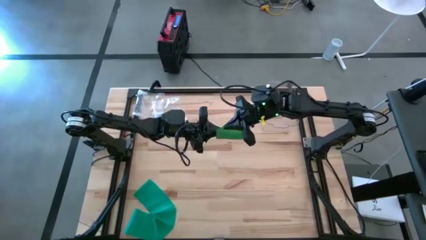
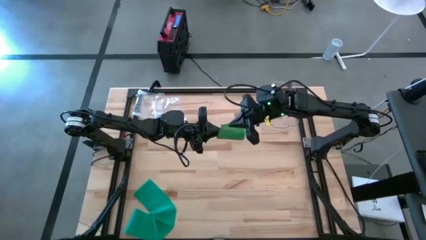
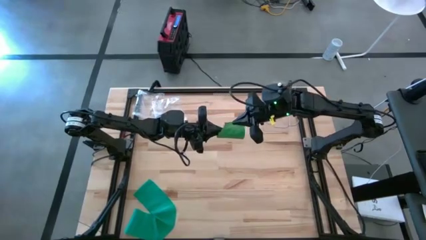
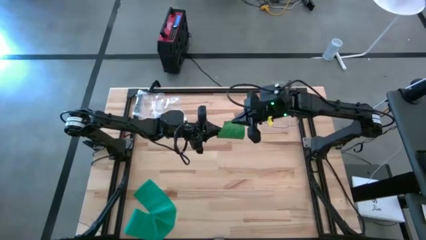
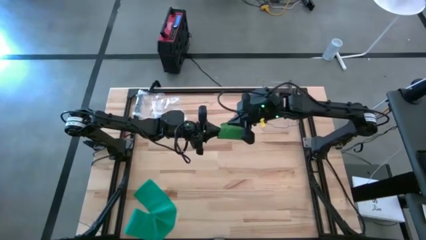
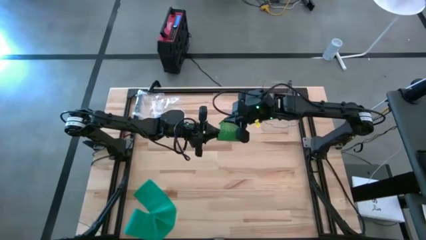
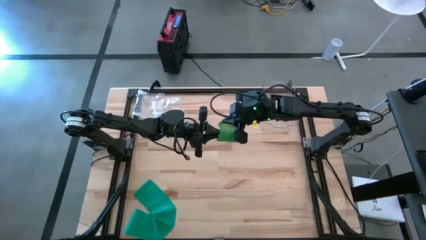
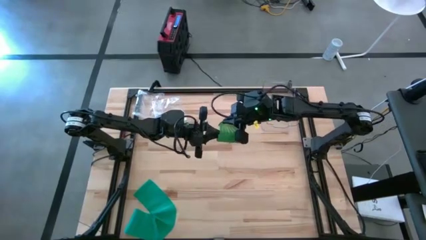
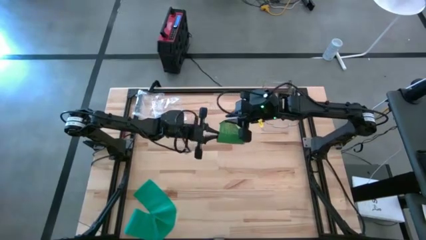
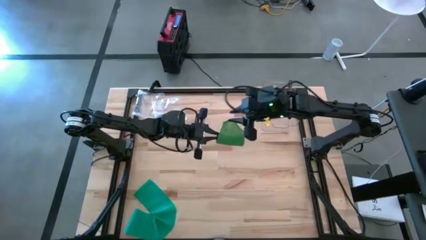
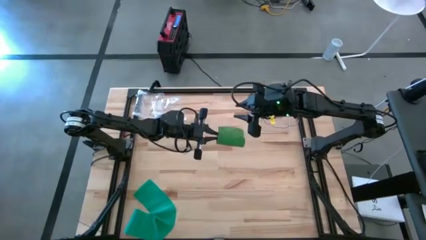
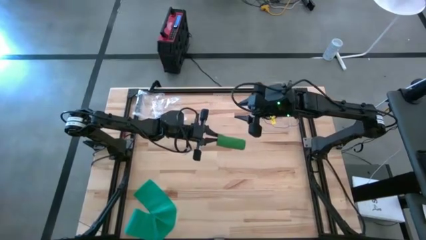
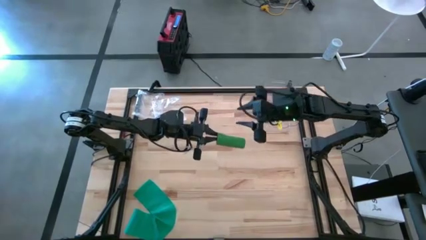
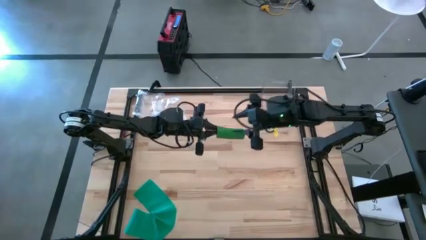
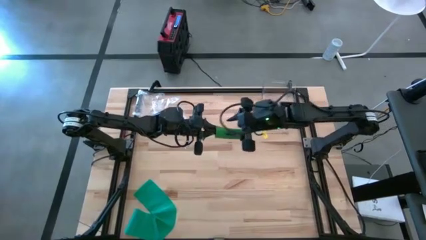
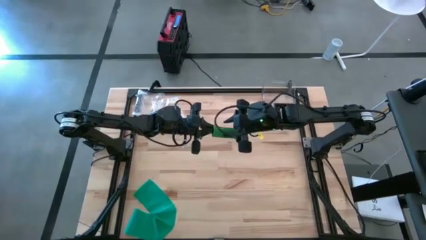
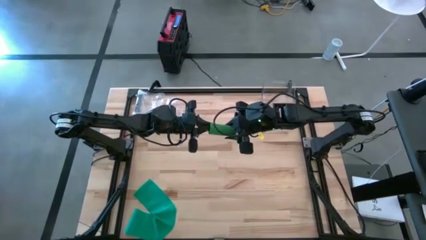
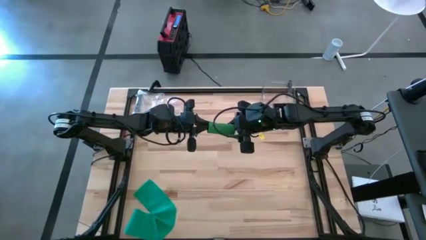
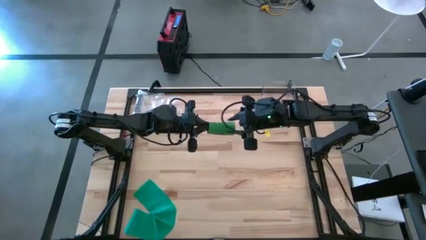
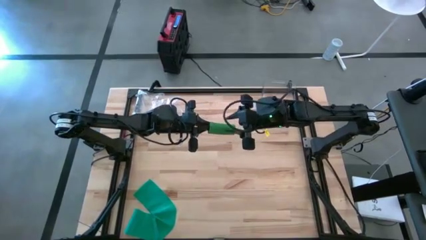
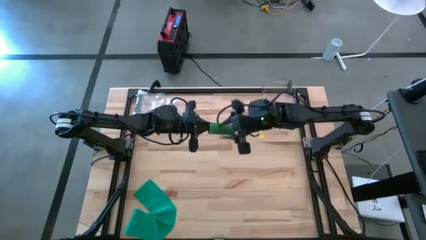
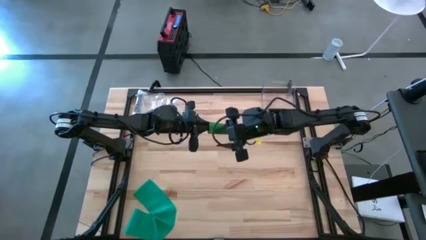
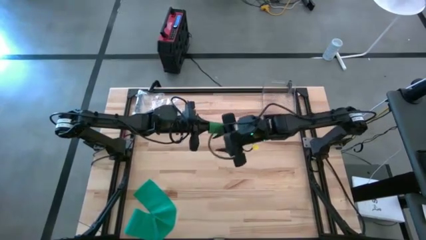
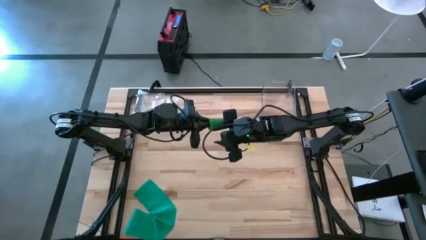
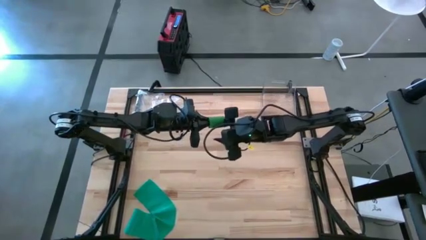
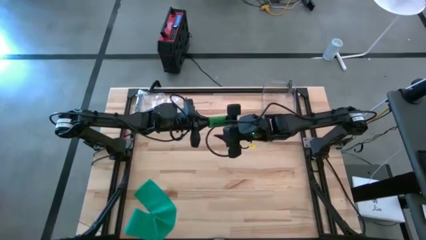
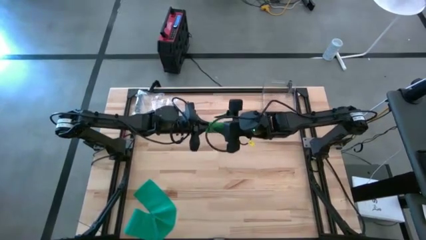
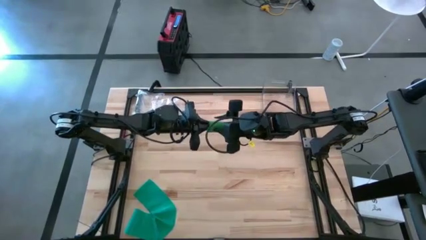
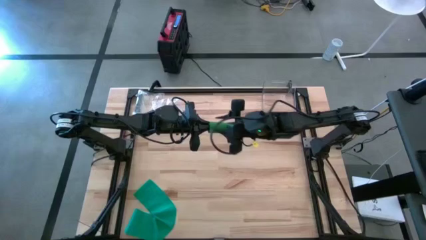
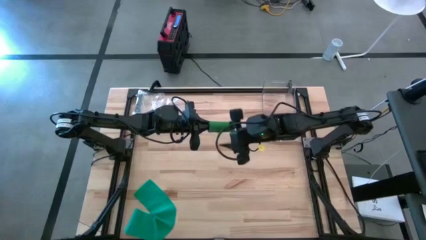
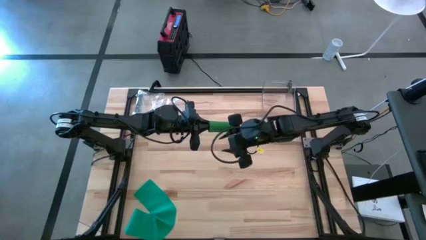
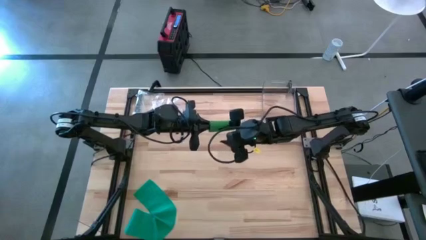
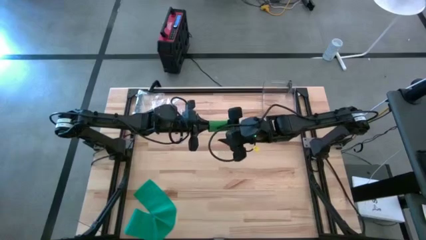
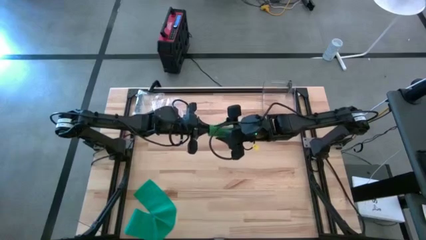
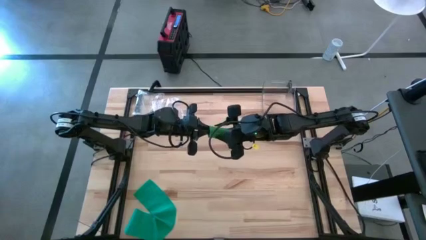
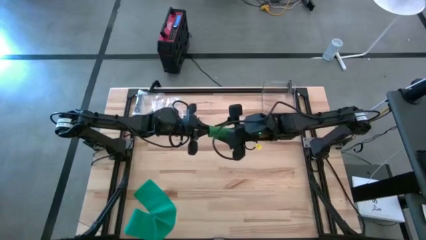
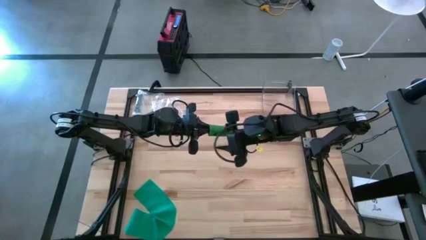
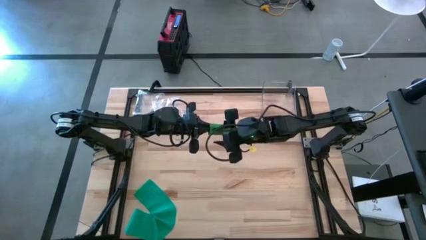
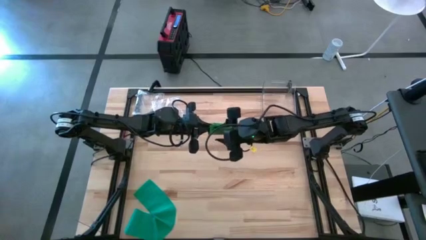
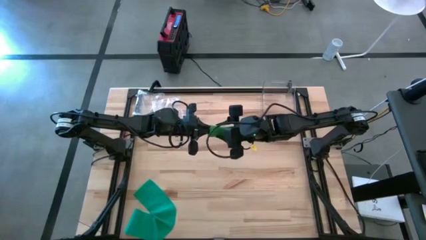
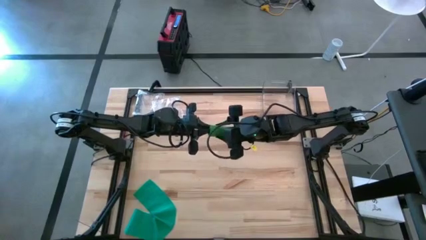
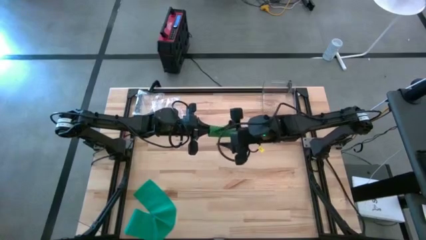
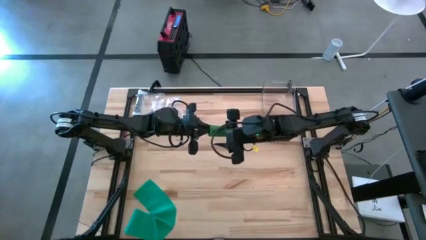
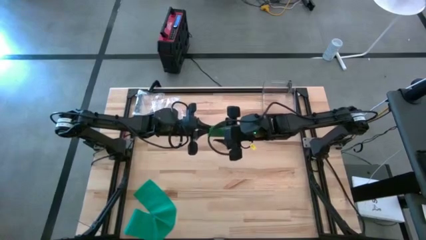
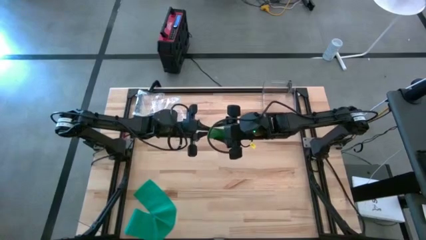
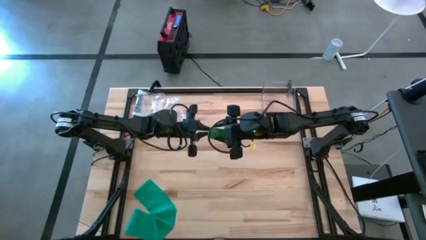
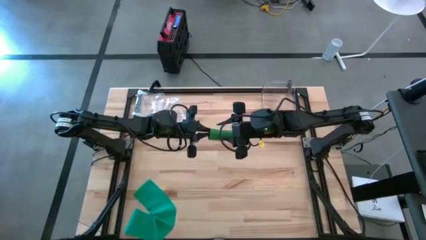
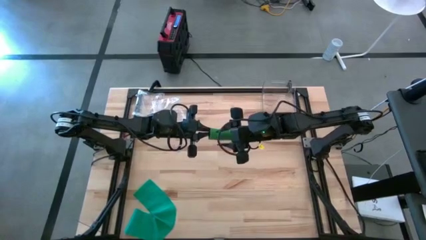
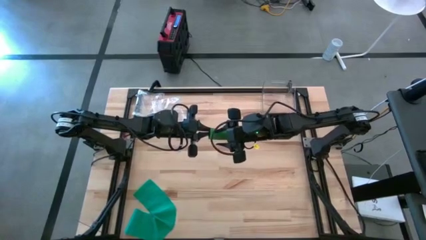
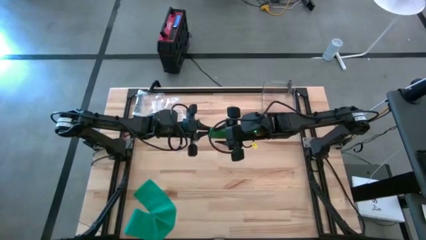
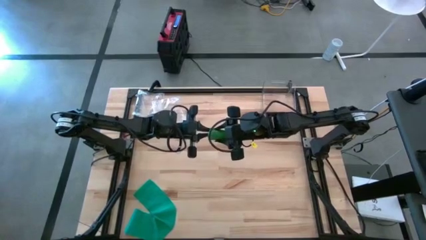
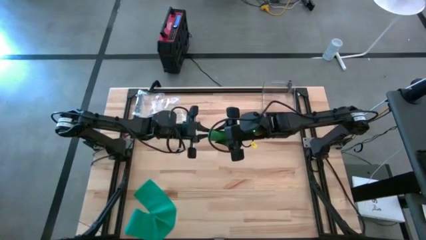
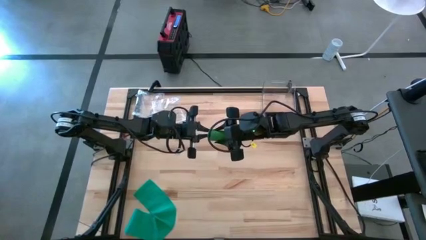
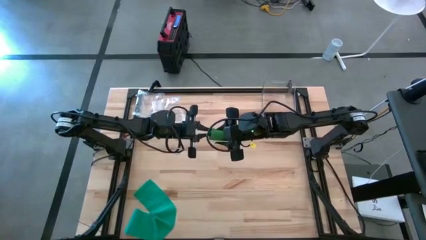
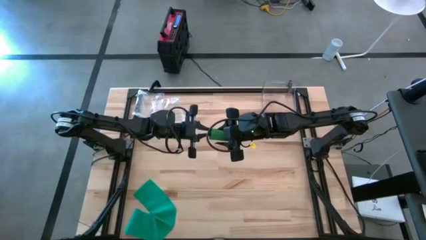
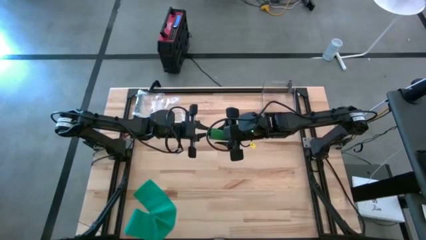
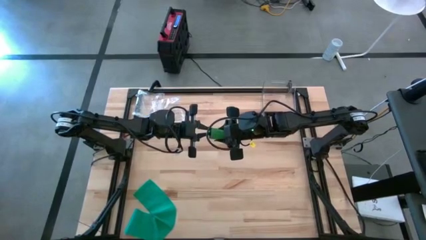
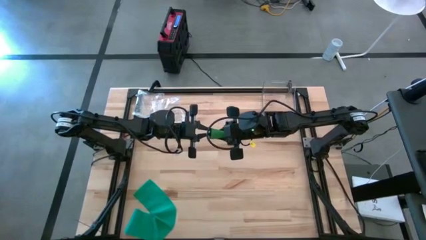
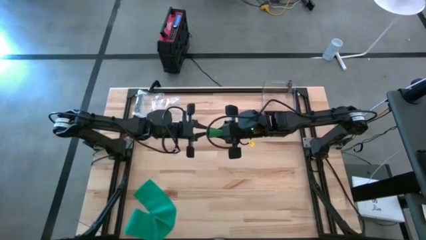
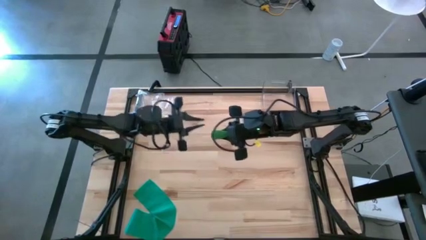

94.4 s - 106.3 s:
Task: Roll bandage
Roll the green bandage

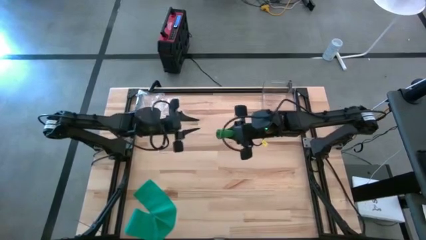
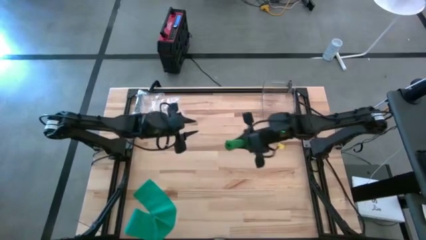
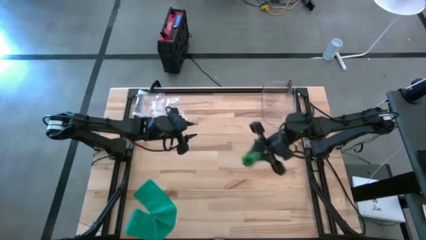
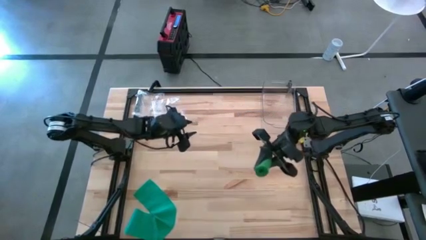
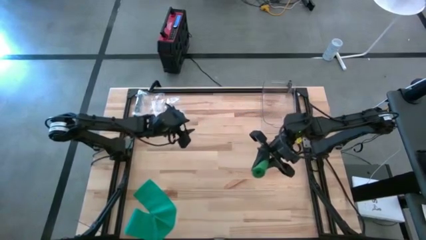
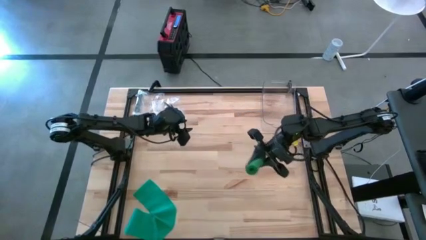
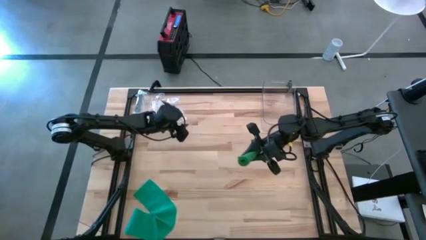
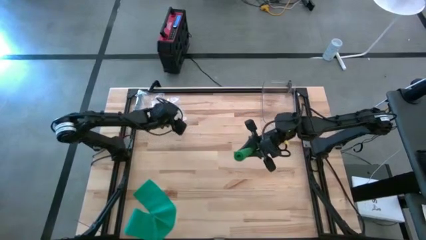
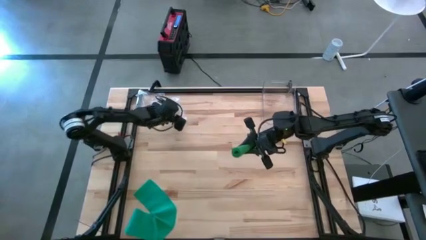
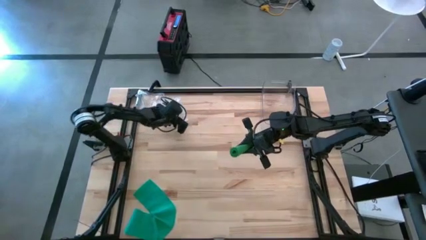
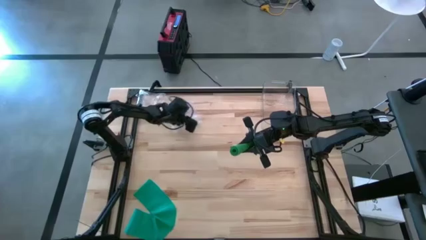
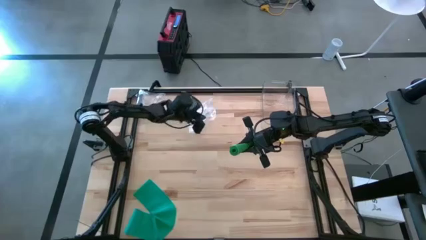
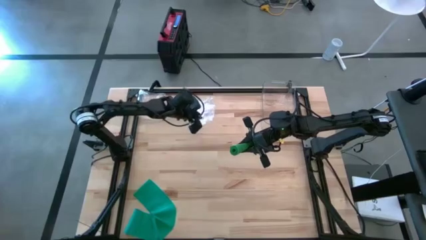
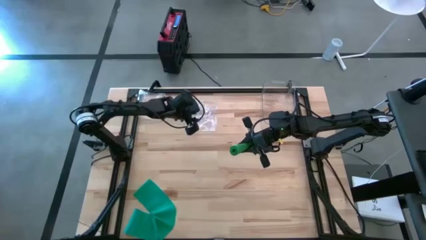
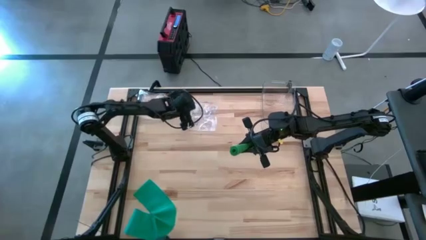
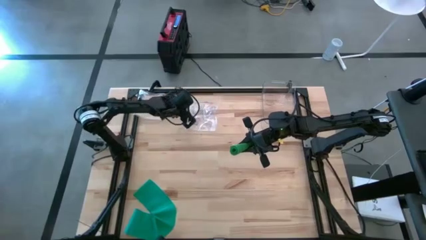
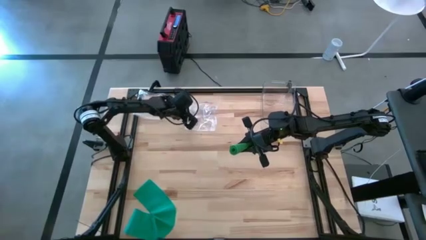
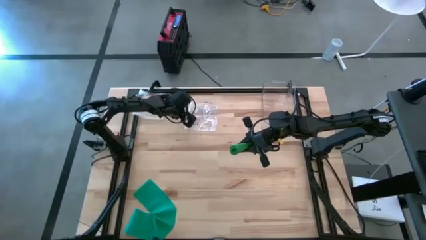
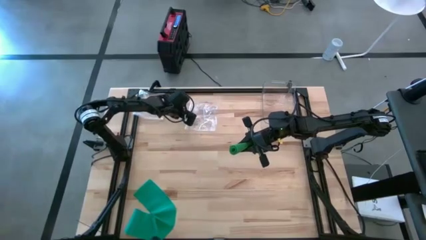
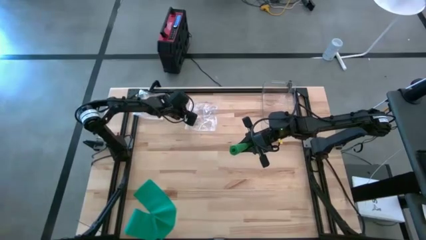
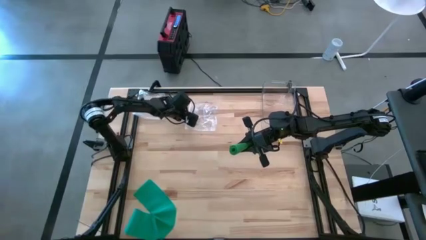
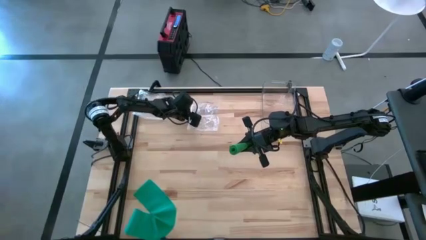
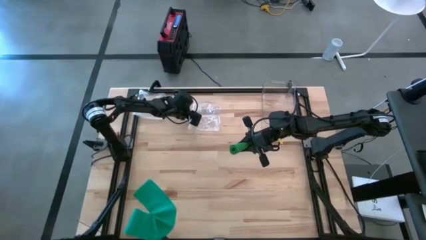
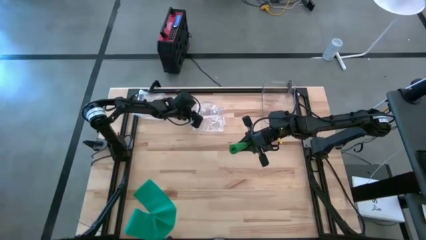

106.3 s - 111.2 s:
Put the rolled green bandage into the transparent zip bag
